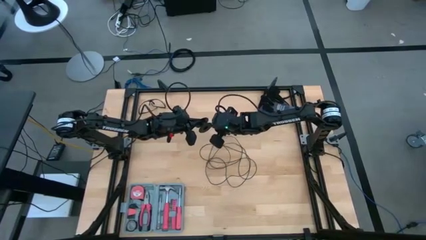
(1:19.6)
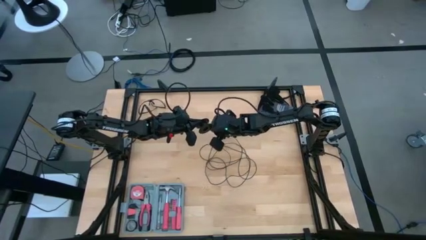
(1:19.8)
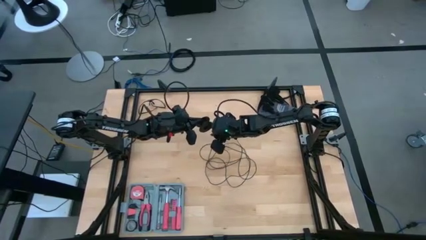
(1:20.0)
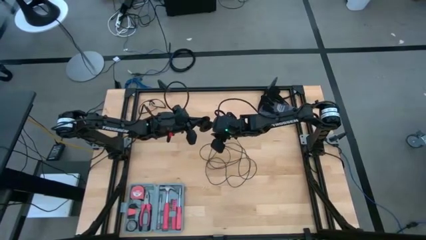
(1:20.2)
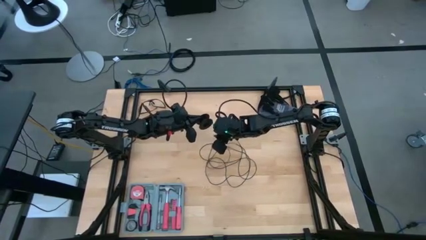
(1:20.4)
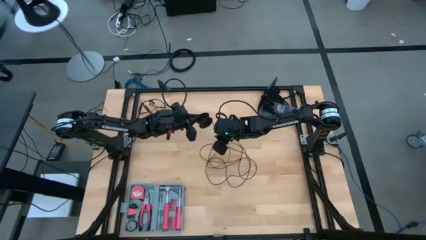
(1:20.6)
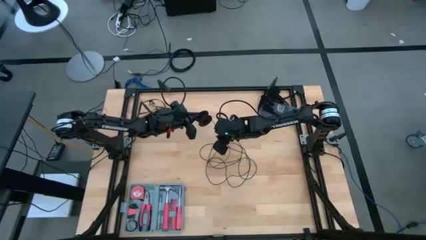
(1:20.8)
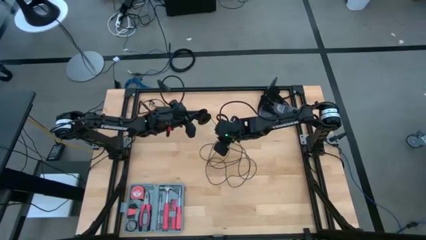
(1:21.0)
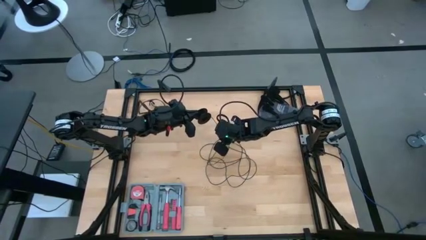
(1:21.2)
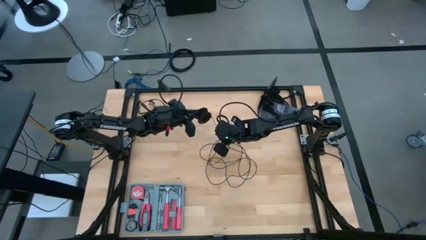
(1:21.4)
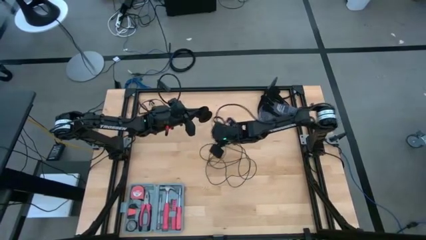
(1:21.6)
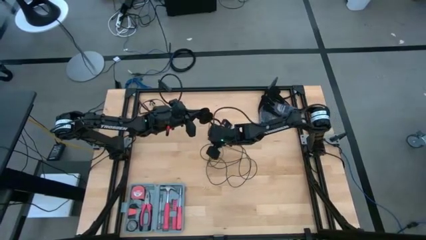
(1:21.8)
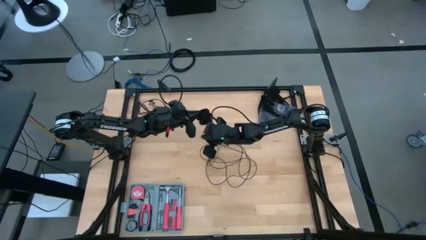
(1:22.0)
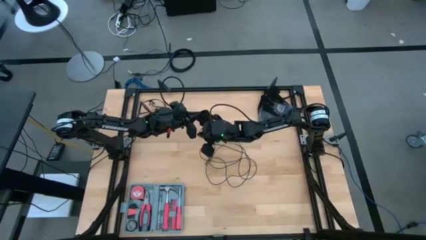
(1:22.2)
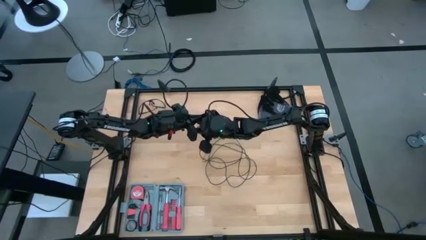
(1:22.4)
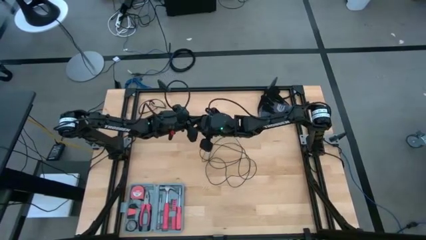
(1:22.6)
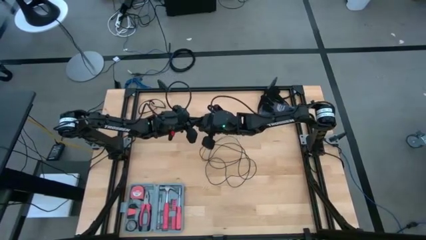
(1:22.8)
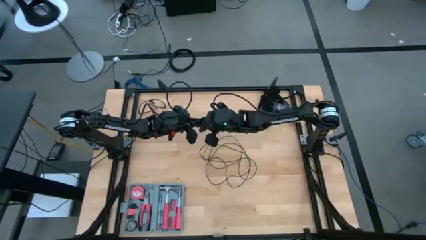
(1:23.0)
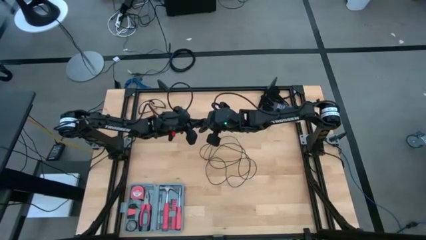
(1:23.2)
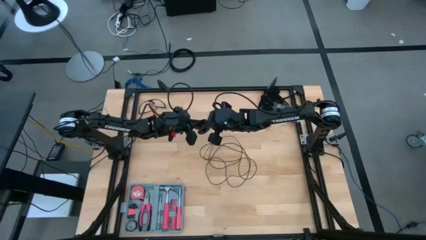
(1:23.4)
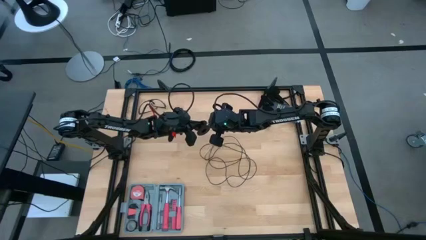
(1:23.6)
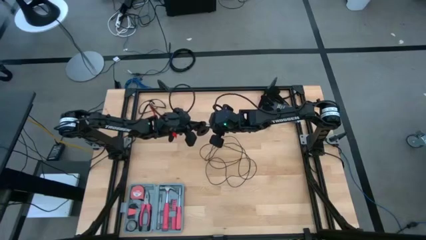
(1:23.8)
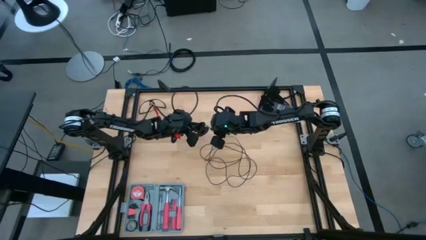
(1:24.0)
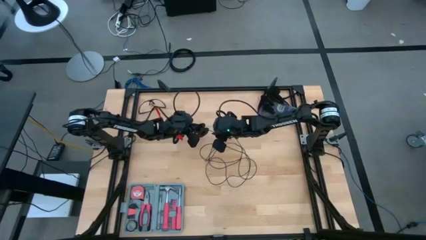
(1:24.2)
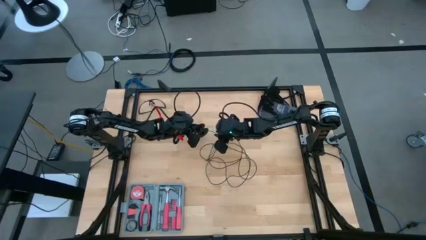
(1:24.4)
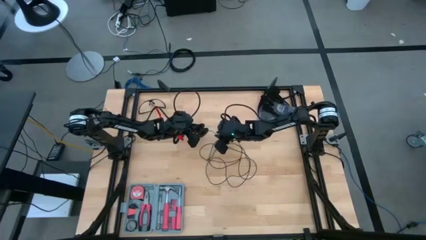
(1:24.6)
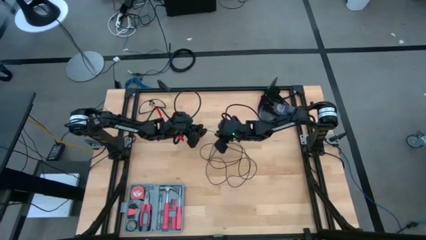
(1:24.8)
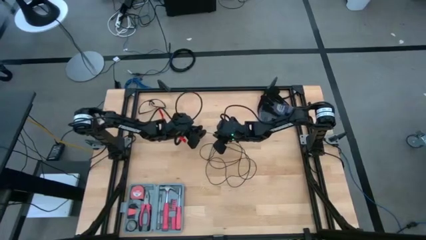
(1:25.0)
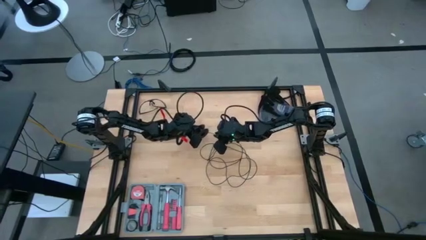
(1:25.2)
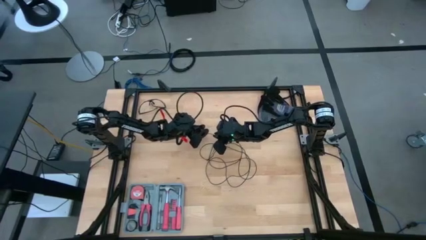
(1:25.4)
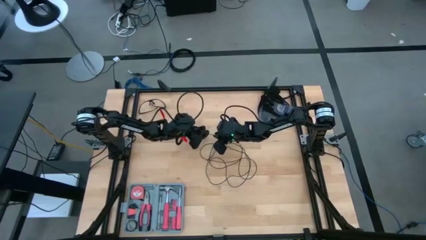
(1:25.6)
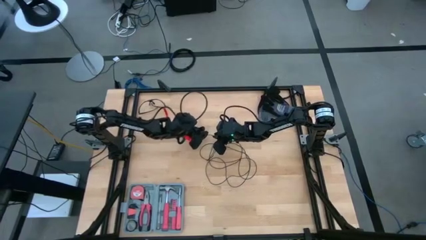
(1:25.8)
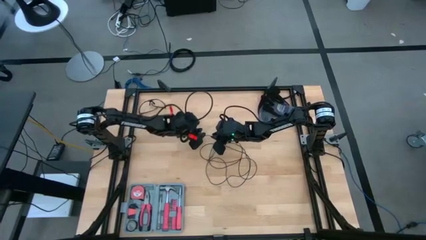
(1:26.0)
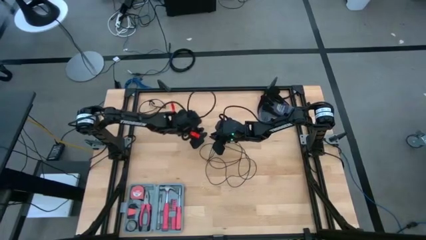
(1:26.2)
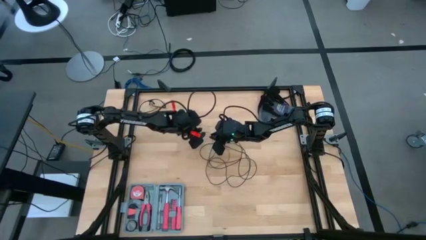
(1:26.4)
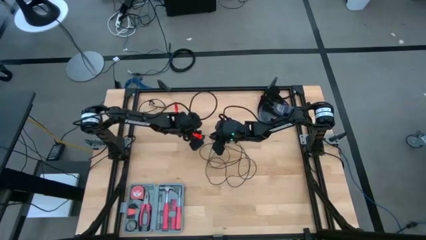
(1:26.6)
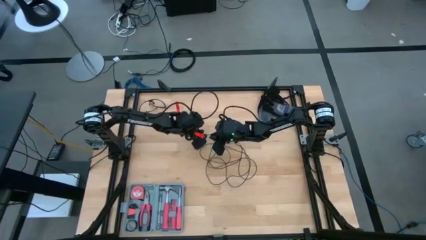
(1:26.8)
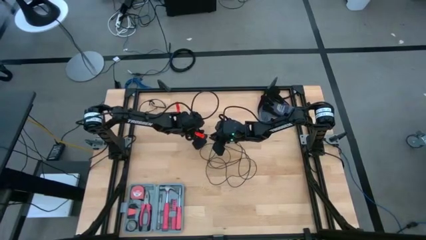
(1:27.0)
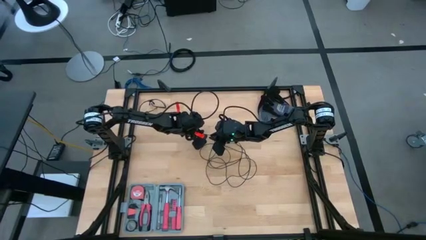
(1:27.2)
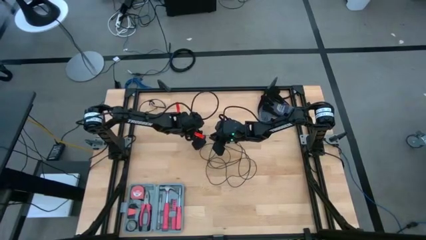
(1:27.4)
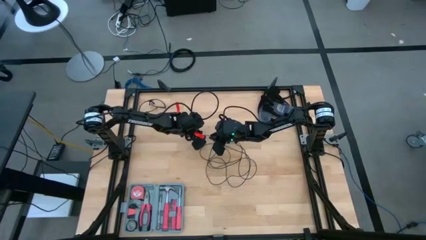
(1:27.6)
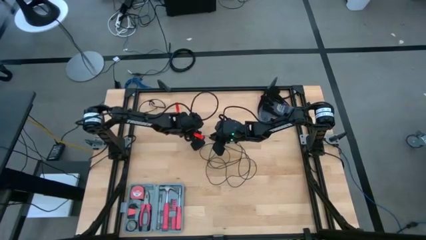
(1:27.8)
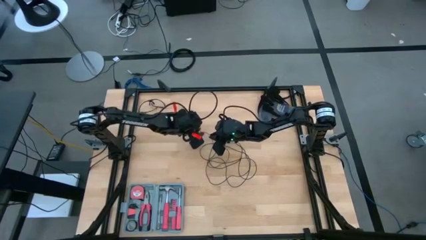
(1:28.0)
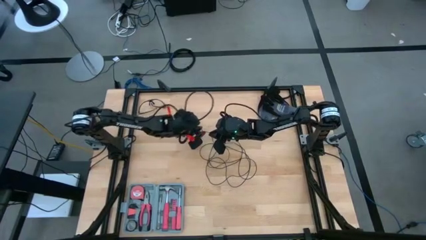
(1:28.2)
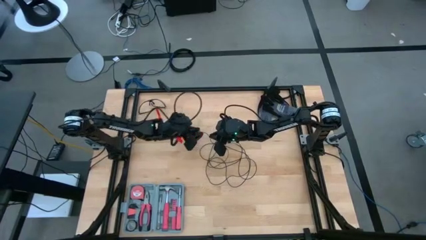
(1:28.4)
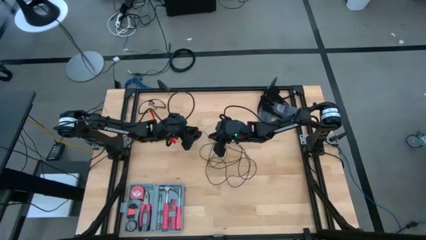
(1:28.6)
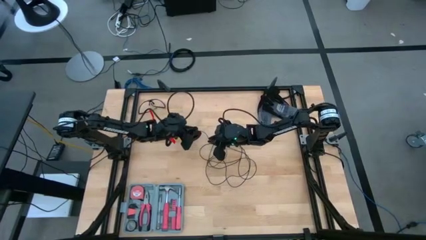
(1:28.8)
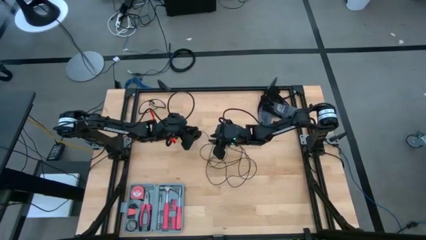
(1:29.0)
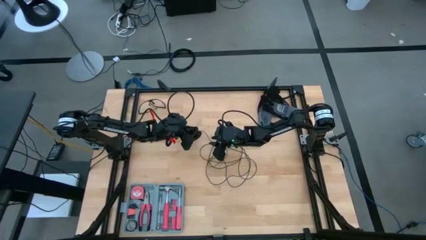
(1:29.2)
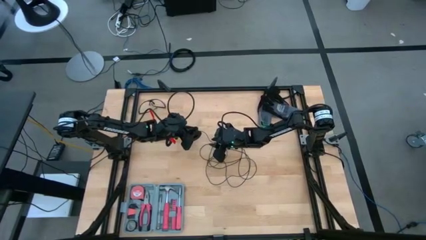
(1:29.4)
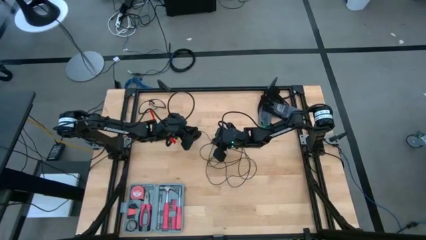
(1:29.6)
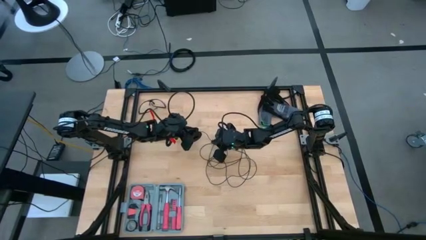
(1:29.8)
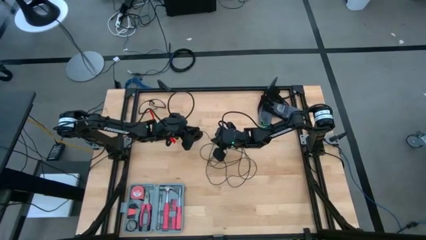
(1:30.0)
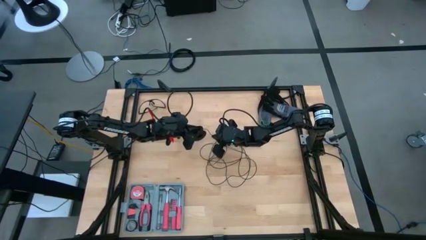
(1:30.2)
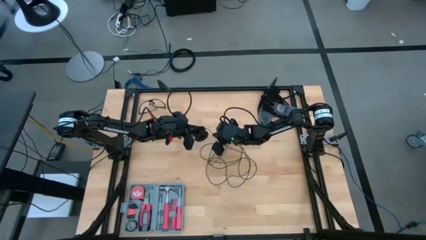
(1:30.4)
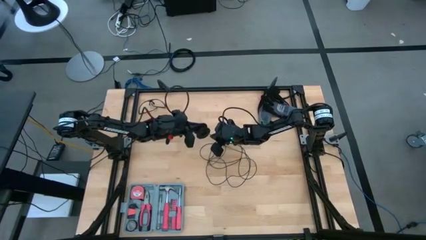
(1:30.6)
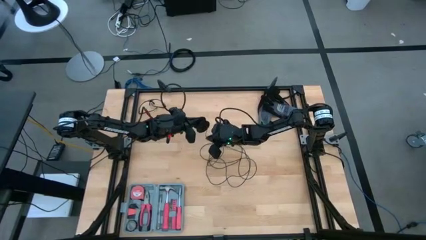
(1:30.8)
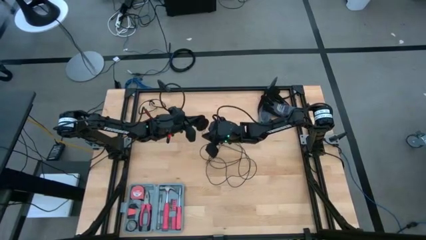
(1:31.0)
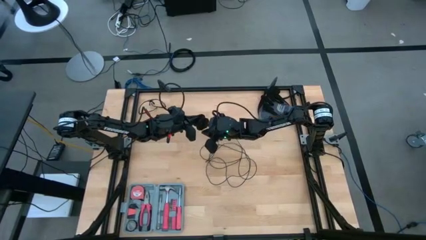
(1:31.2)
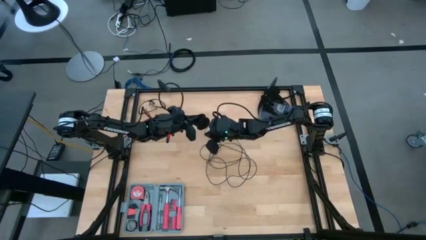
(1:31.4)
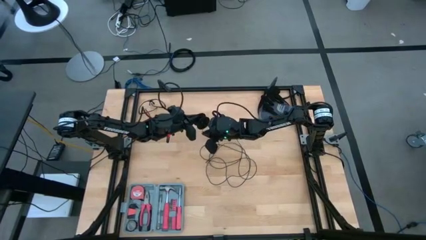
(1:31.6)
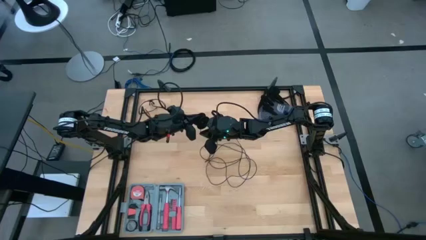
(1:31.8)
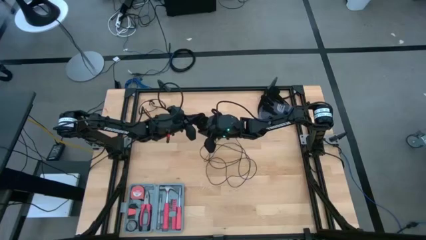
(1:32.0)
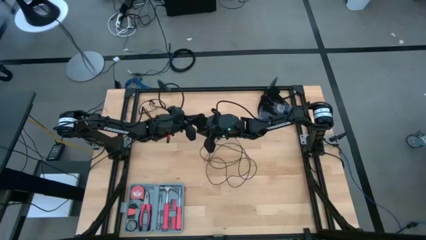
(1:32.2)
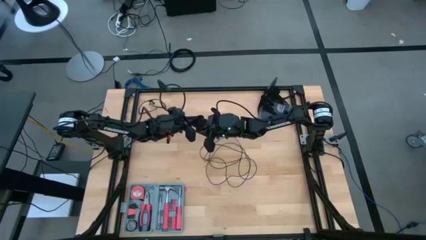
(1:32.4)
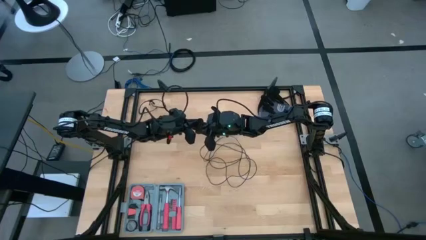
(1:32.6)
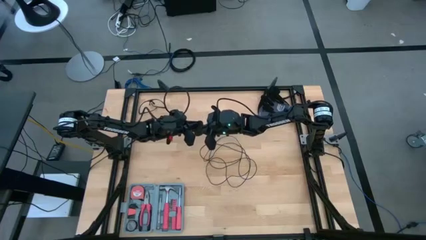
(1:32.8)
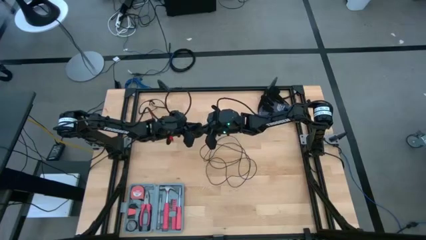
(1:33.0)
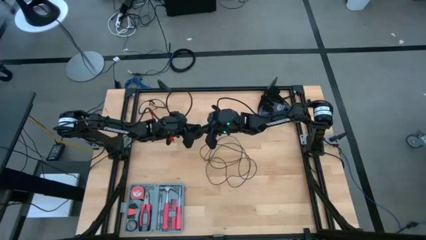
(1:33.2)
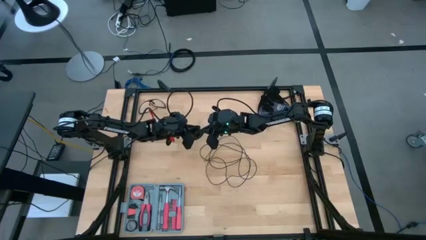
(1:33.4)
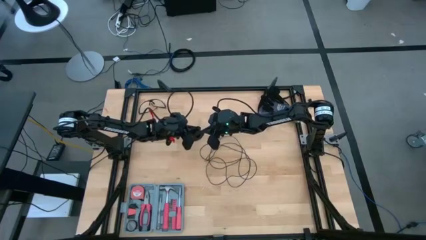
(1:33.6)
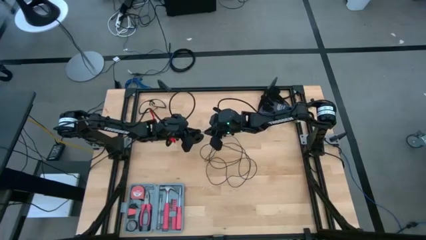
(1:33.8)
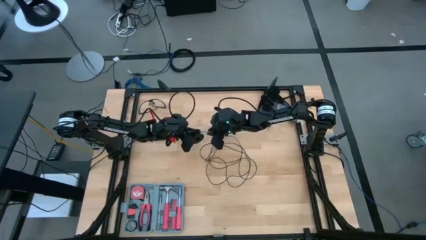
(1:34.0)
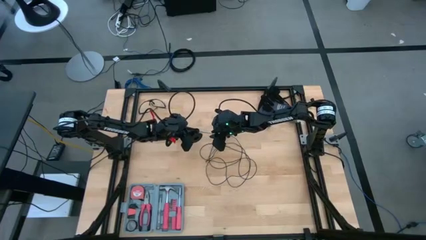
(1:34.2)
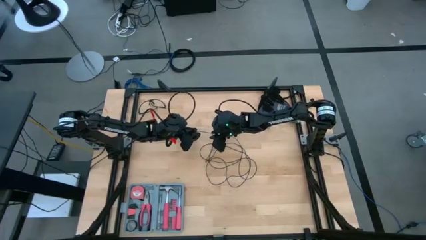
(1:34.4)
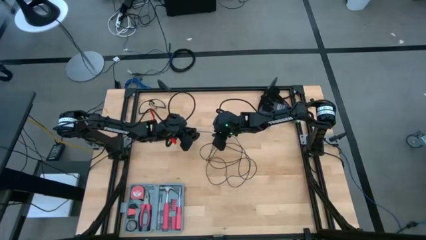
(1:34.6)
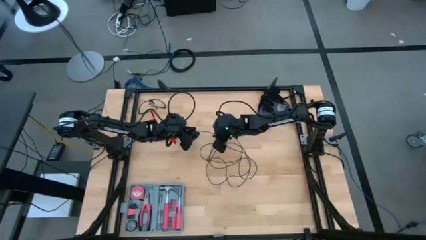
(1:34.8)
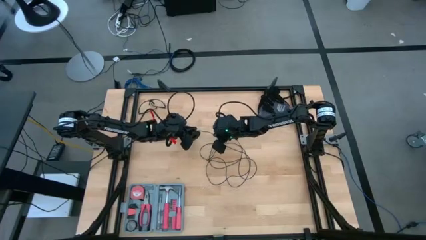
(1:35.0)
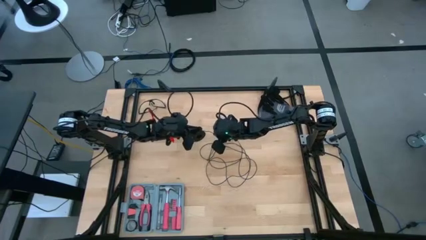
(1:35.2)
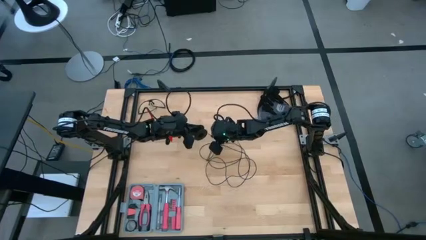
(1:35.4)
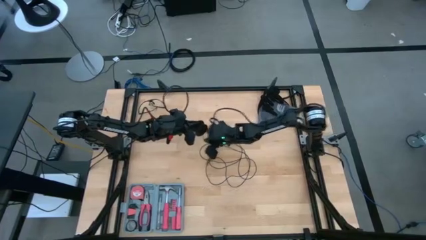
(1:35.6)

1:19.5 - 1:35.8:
Task: Coil cords
Coil the black wire onto the black spool
